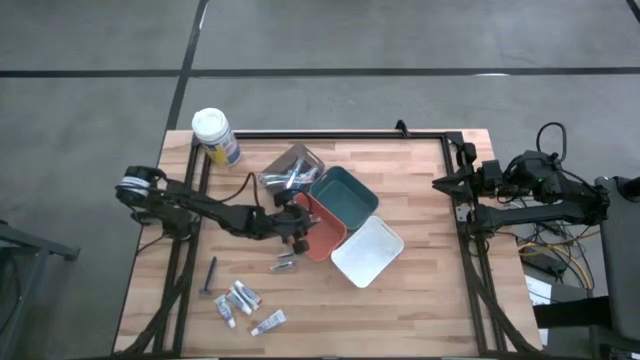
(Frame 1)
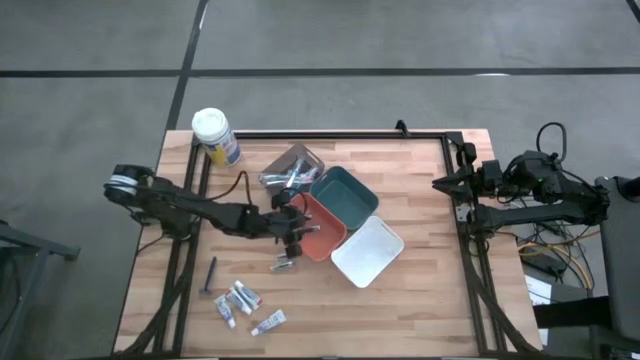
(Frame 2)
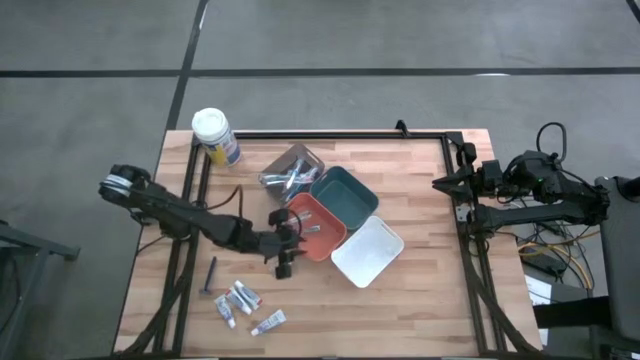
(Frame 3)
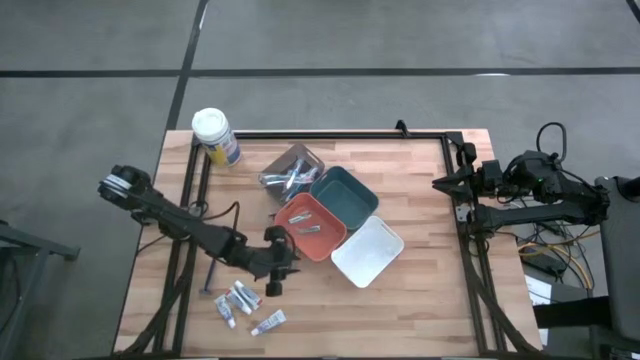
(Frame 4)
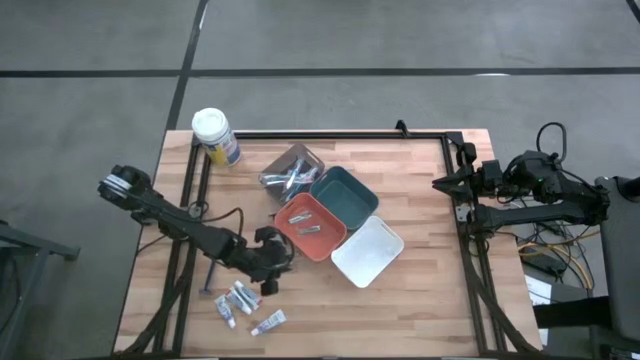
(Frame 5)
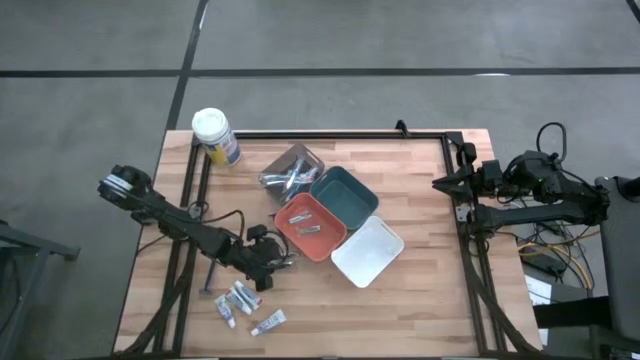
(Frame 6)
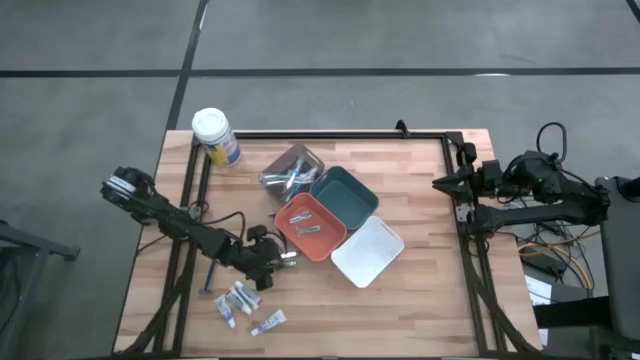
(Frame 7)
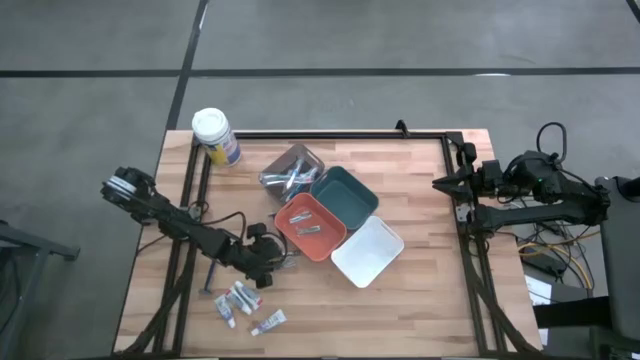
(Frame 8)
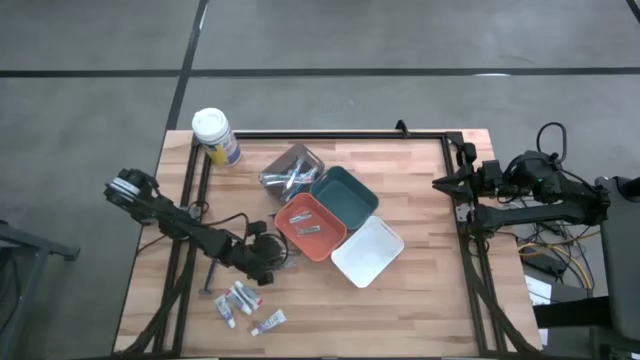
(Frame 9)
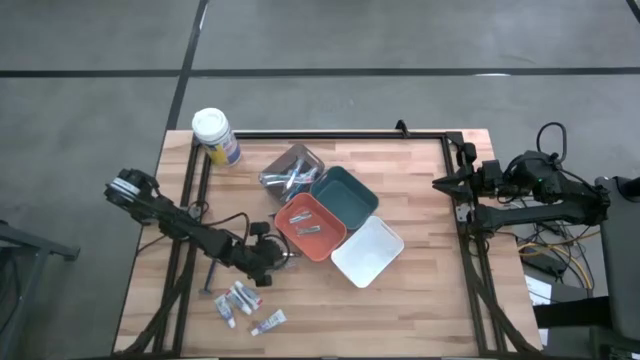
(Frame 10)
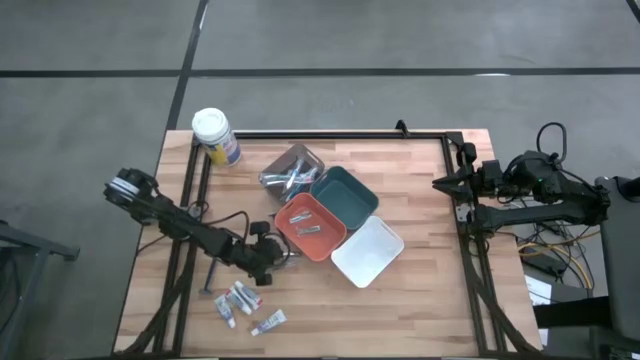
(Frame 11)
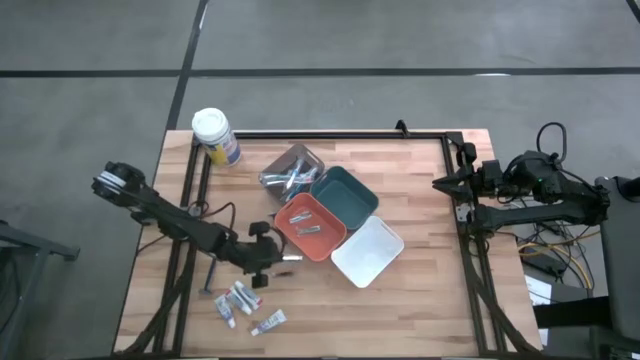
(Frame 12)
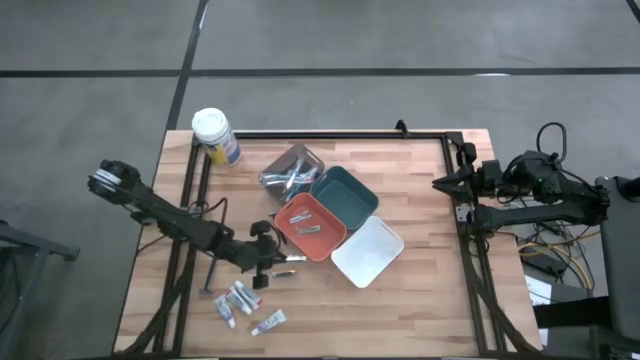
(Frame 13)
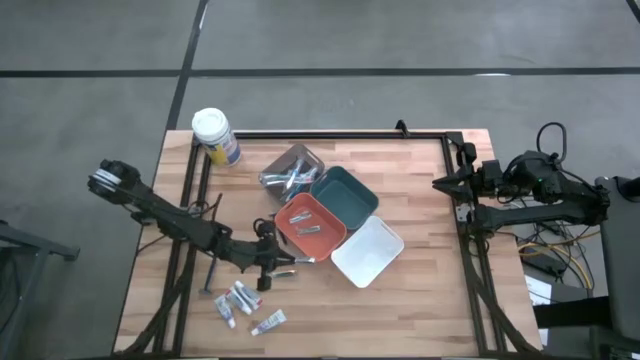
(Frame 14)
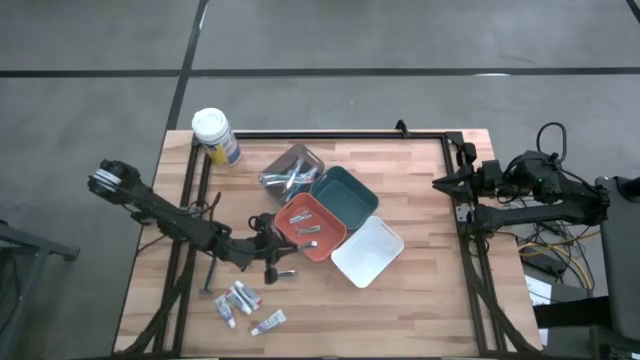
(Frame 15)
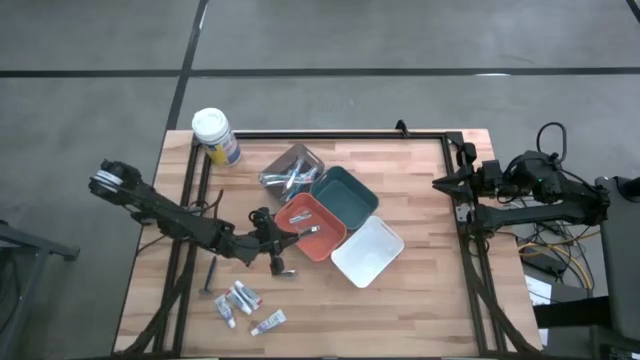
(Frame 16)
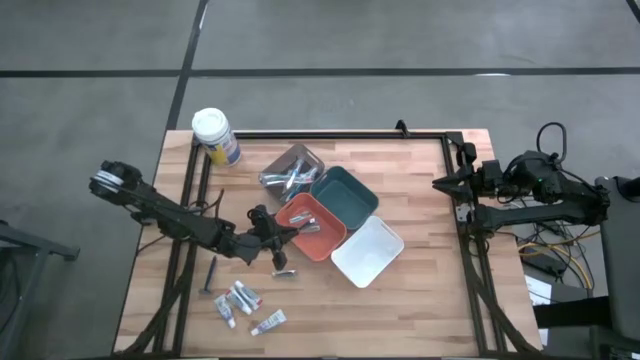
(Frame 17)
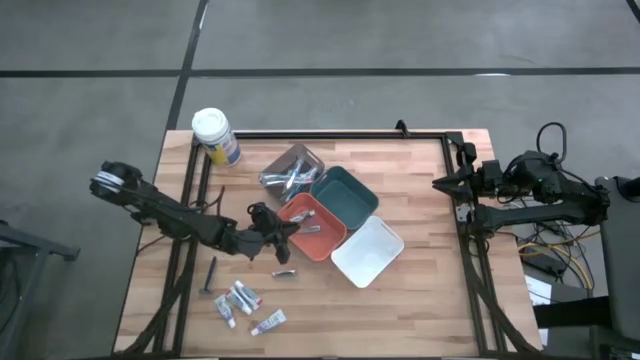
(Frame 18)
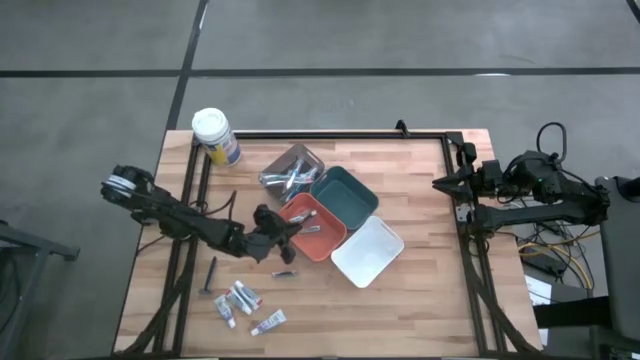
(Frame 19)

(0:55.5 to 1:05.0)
Task: Pick & Place Travel size toiletries
Put the nail cutter into the orange bin

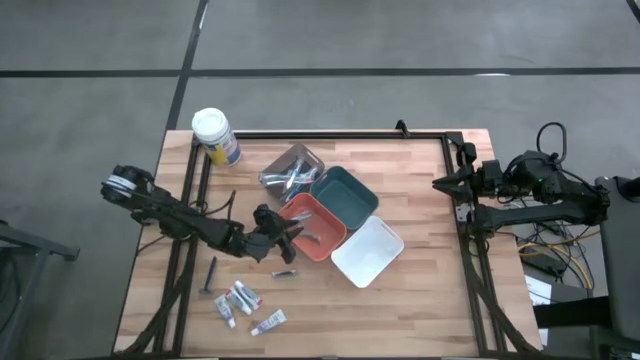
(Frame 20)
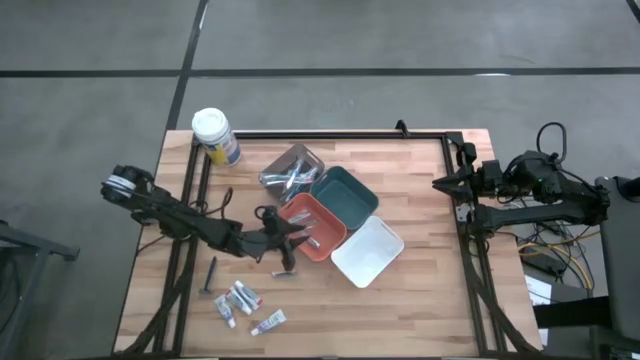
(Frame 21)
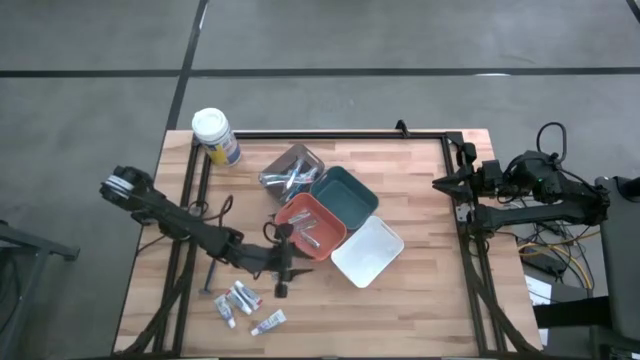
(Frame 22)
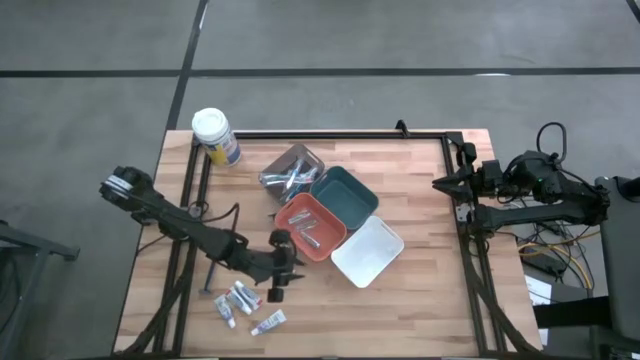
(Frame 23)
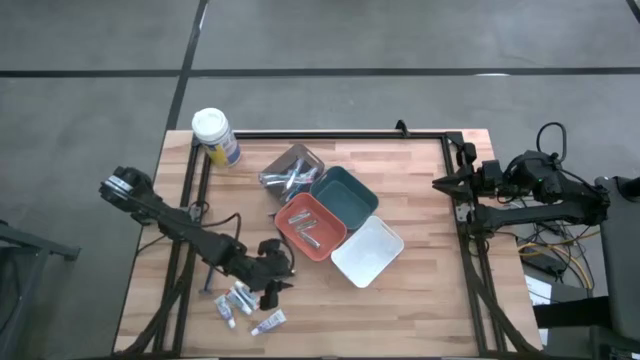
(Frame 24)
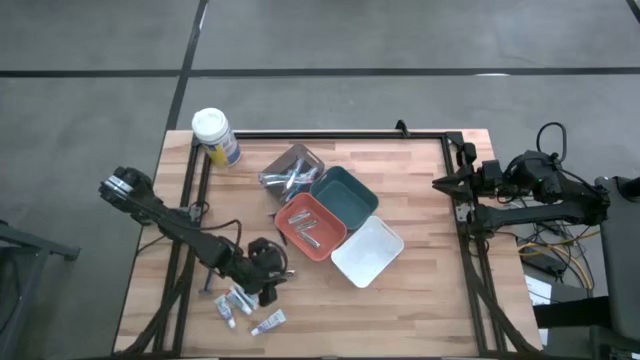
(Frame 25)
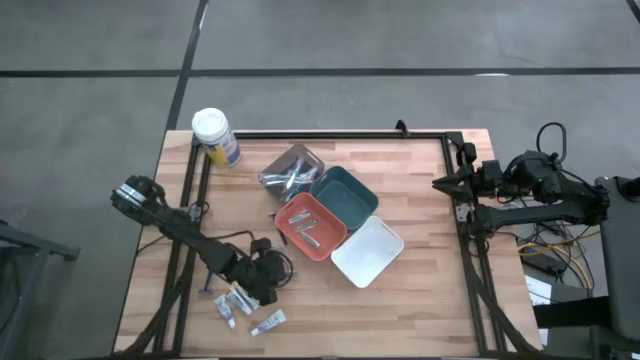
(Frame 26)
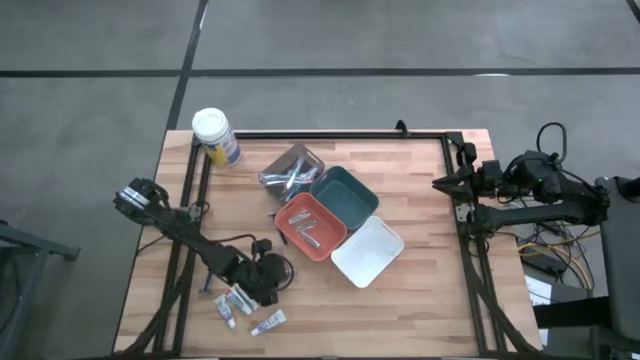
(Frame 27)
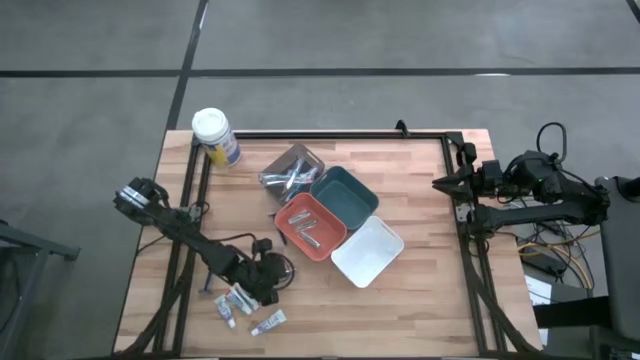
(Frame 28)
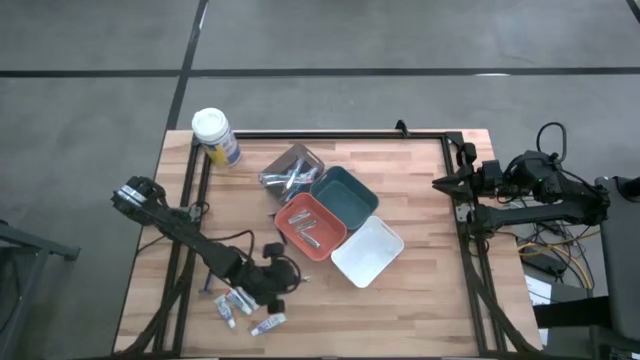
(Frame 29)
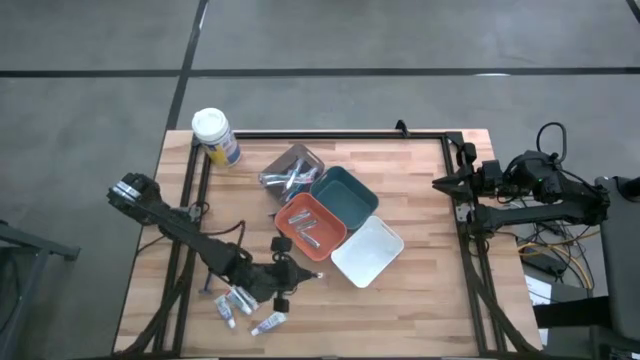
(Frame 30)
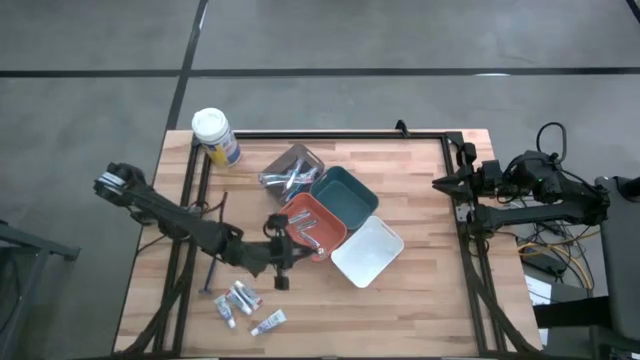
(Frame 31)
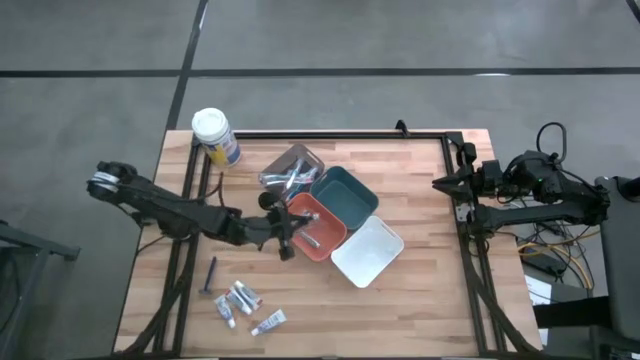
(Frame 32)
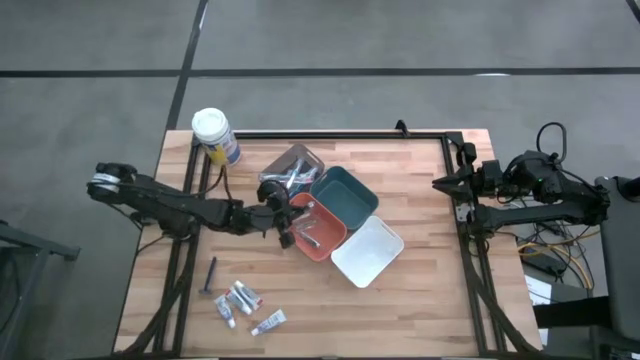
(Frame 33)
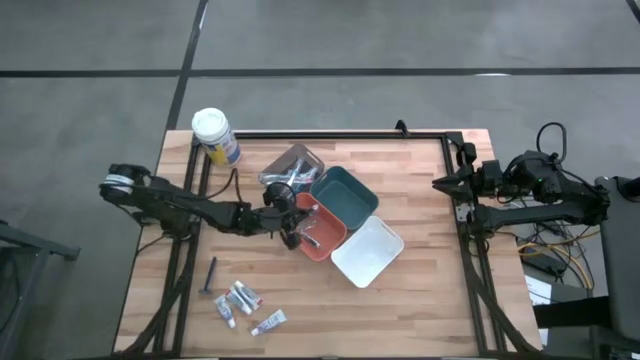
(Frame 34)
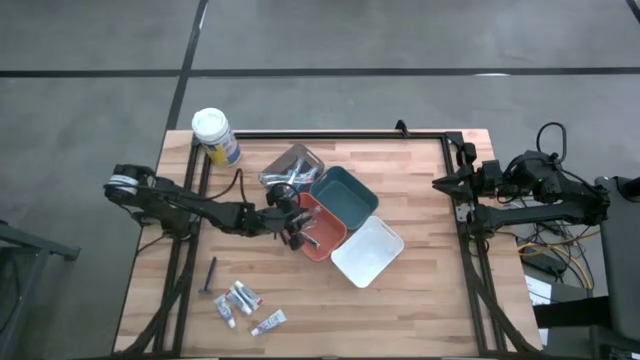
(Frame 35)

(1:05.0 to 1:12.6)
Put the nail cutter into the orange bin

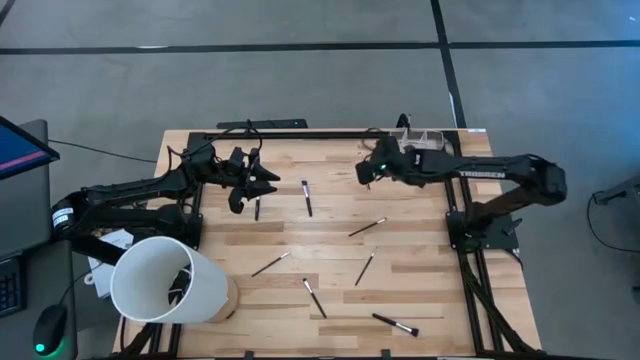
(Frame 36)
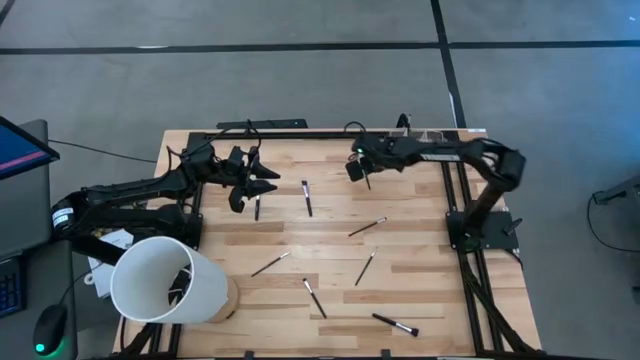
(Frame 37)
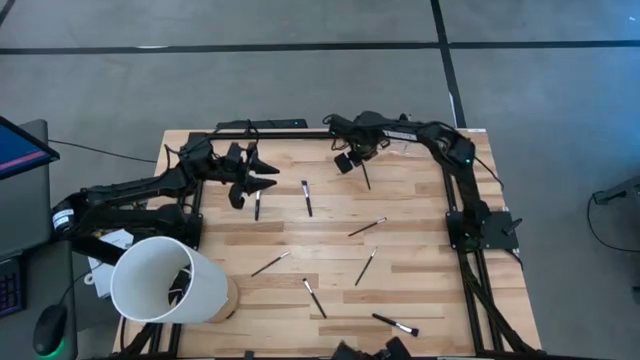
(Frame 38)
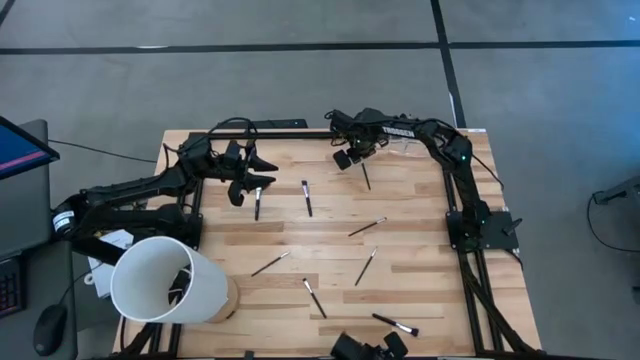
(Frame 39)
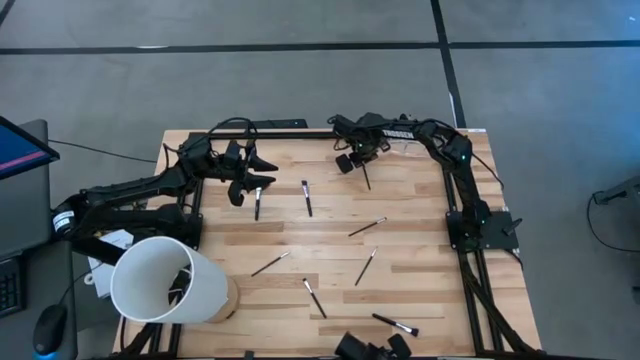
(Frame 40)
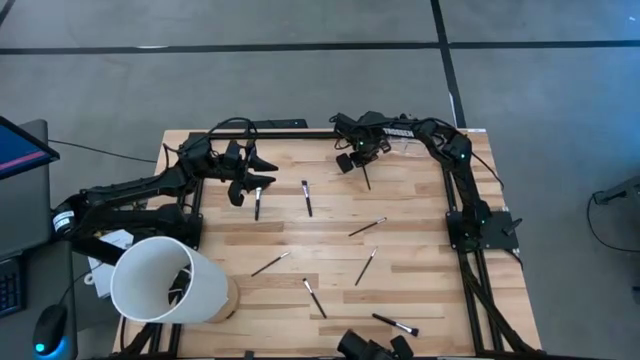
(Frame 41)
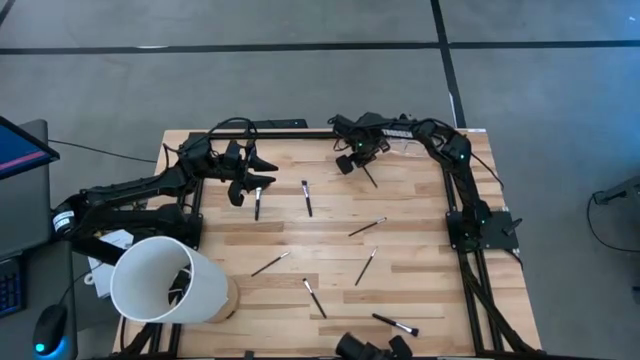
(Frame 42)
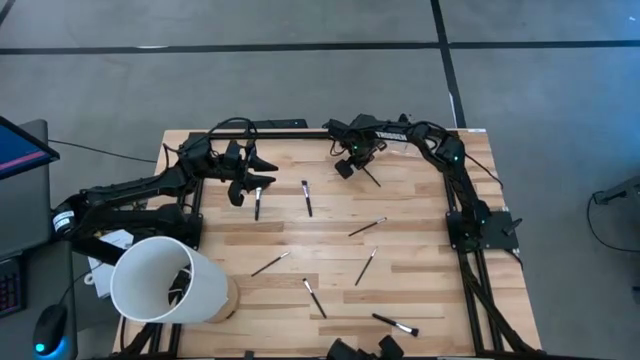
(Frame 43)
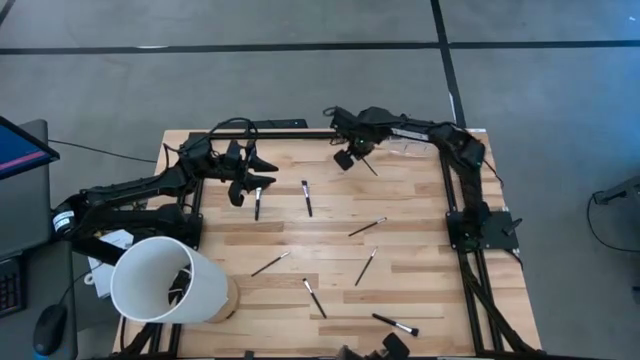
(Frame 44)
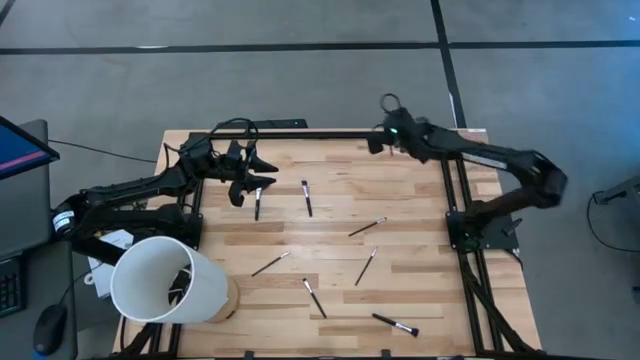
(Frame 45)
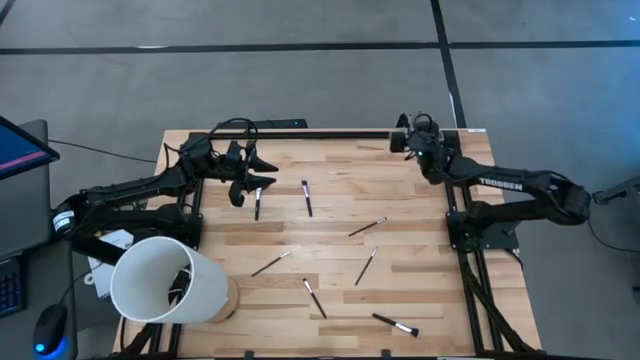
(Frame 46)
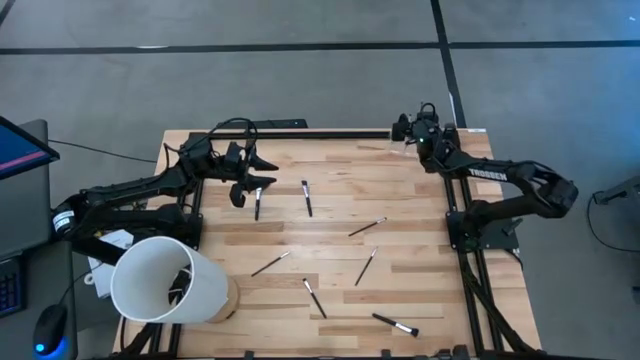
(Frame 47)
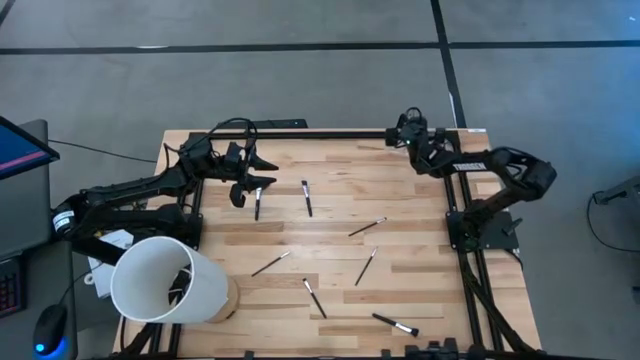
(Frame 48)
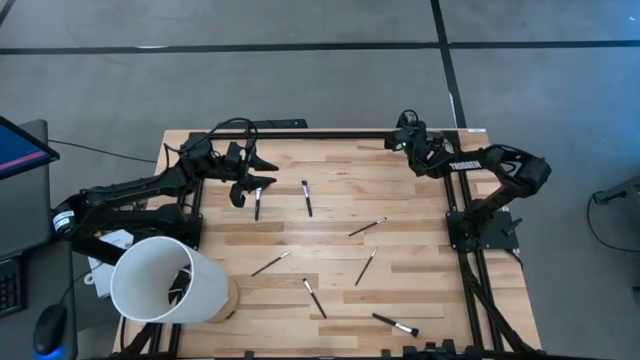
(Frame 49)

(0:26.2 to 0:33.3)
Task: Put items in baskets/containers
Put the black eyeshadow brush into the middle section of the transparent organizer
